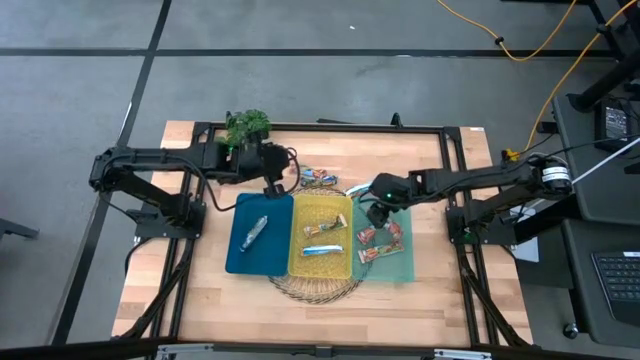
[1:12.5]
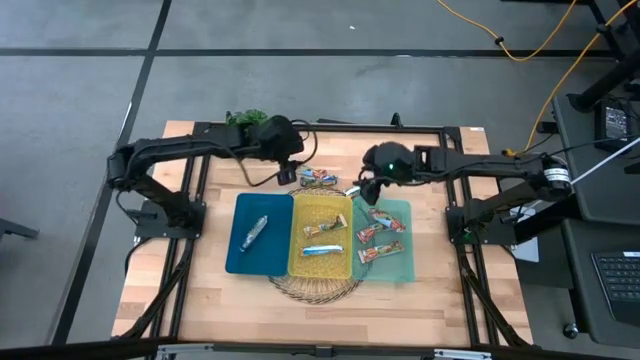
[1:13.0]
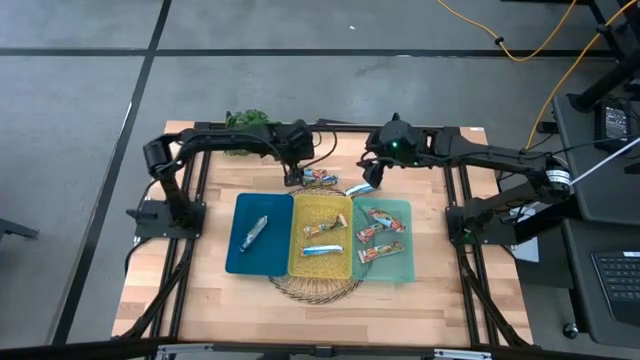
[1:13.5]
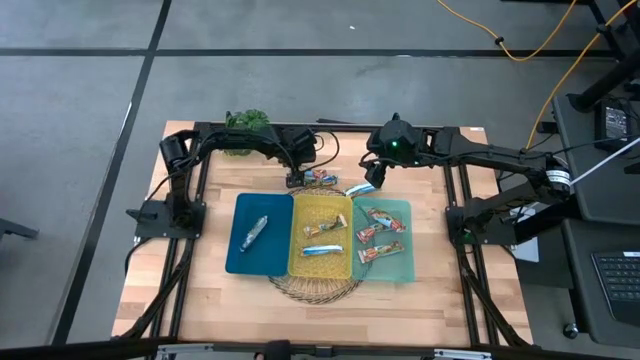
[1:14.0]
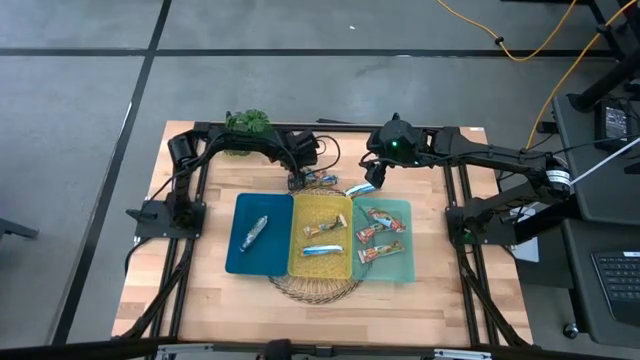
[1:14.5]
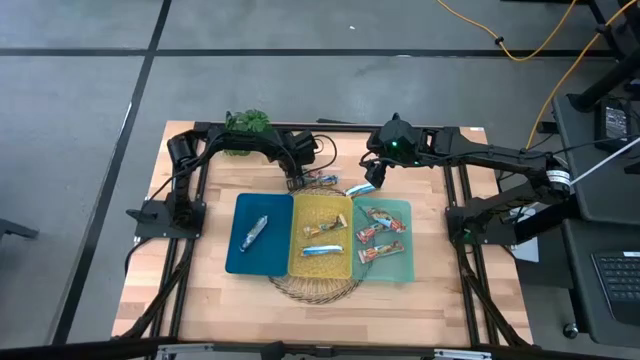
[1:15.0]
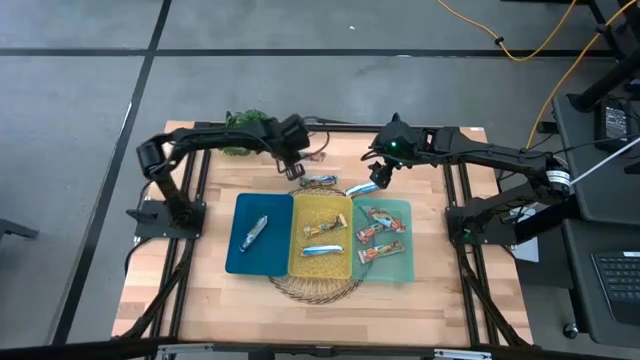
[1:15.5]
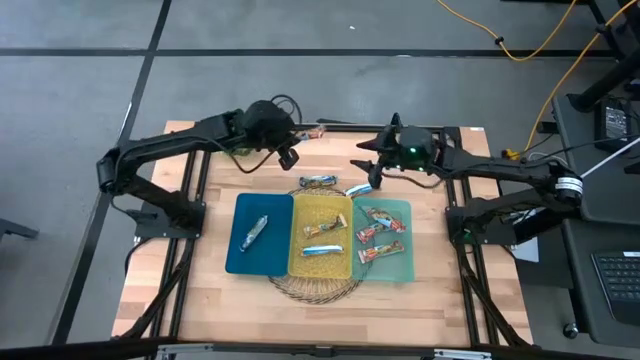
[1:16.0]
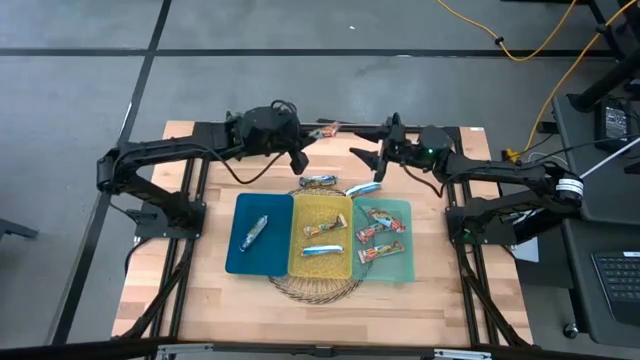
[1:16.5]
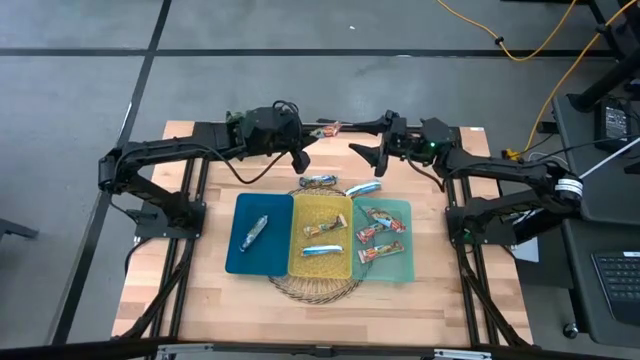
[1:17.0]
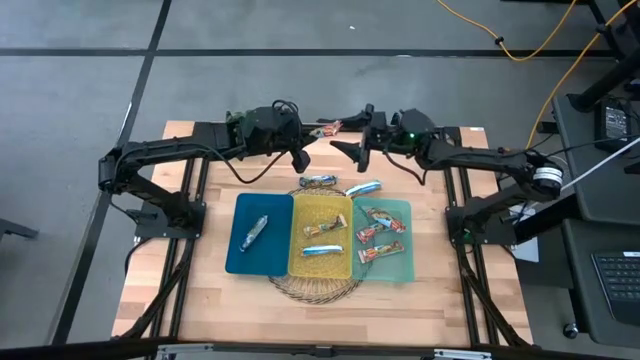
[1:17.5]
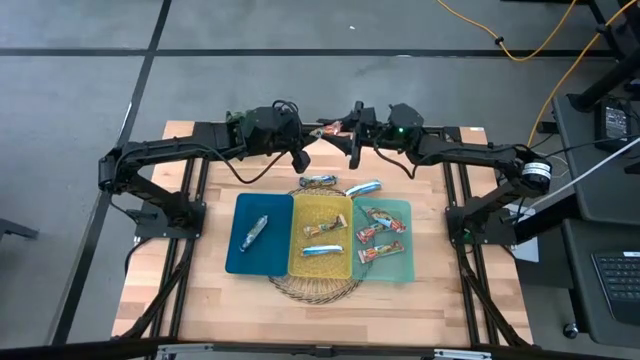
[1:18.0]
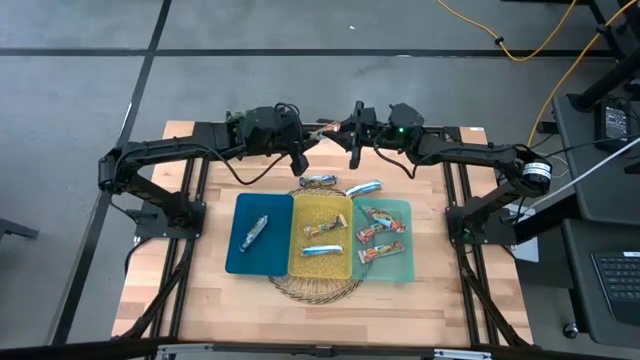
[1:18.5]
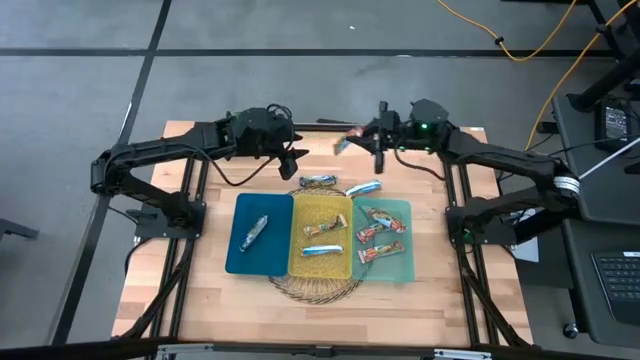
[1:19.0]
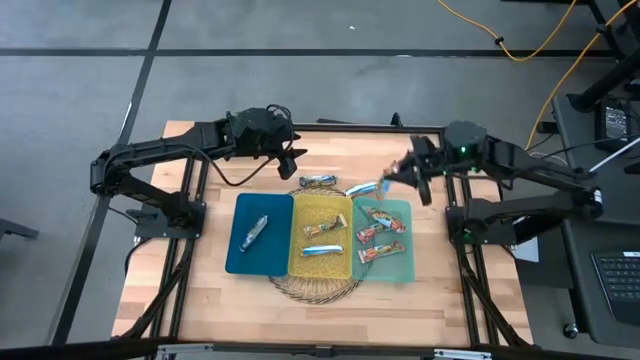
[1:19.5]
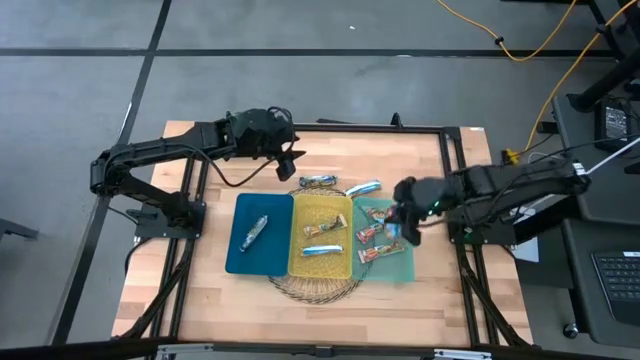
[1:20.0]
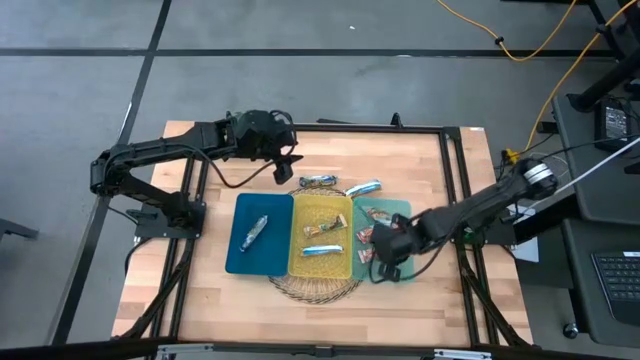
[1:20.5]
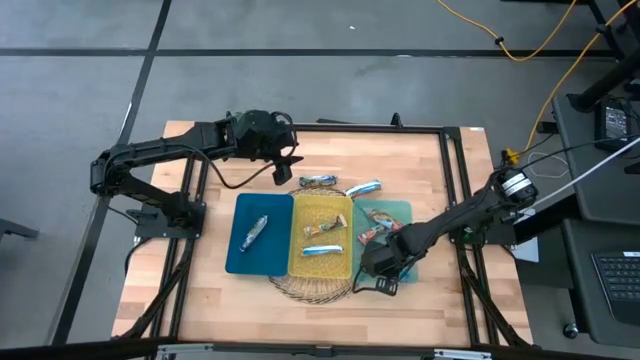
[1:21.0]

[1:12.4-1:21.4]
Task: Pick and place Granola Bars by type
Put the red granola bar into the green bin

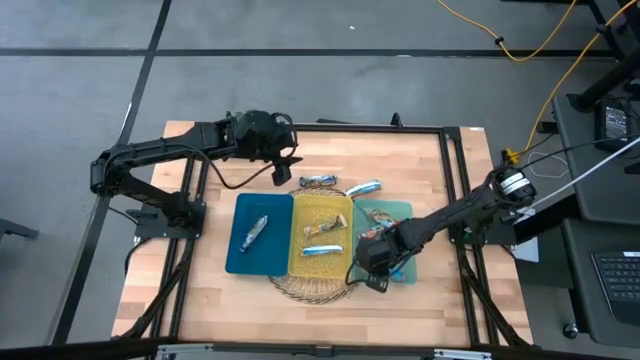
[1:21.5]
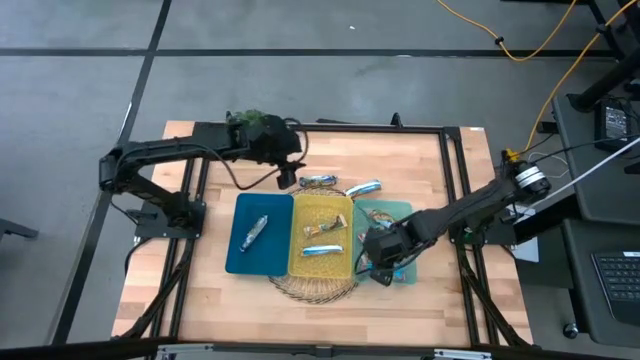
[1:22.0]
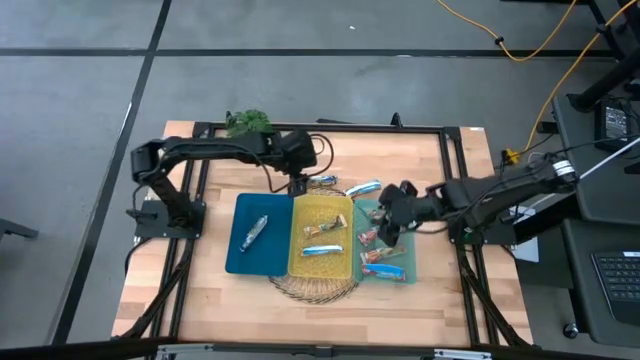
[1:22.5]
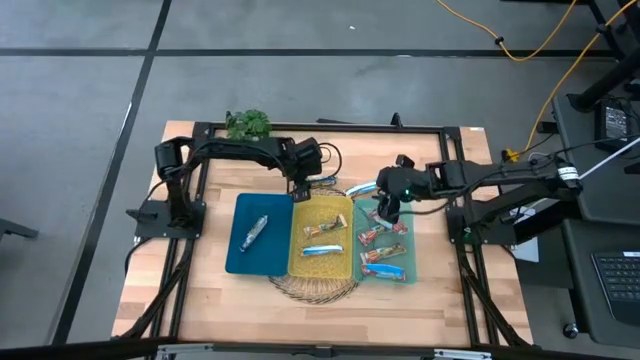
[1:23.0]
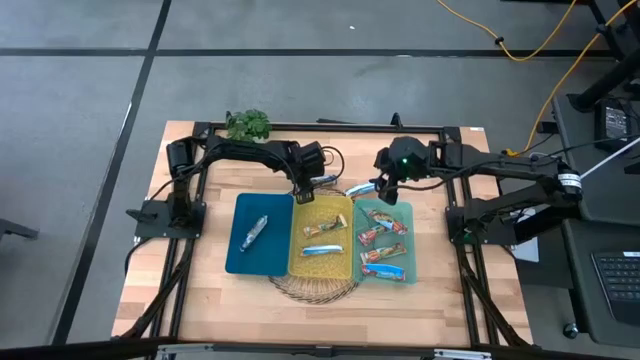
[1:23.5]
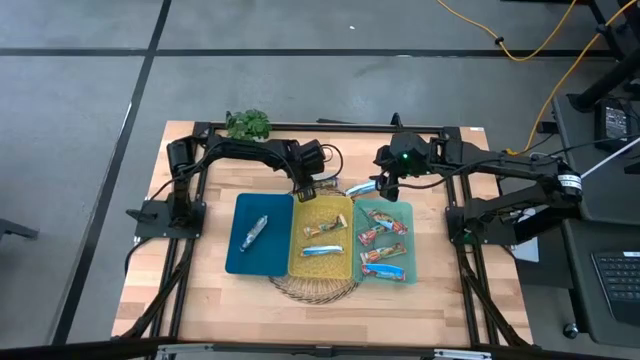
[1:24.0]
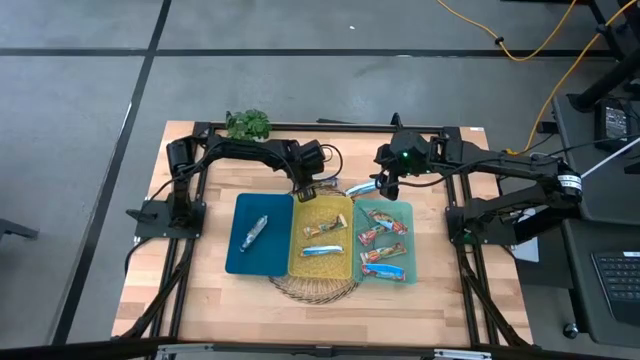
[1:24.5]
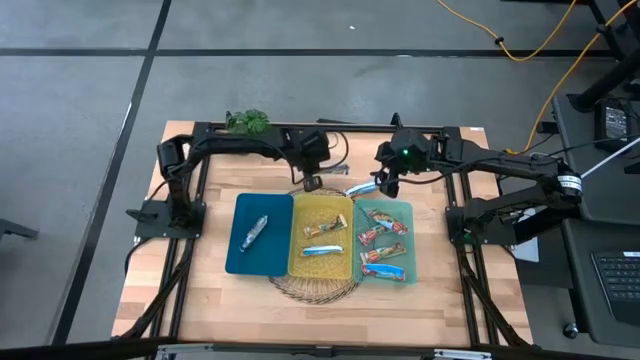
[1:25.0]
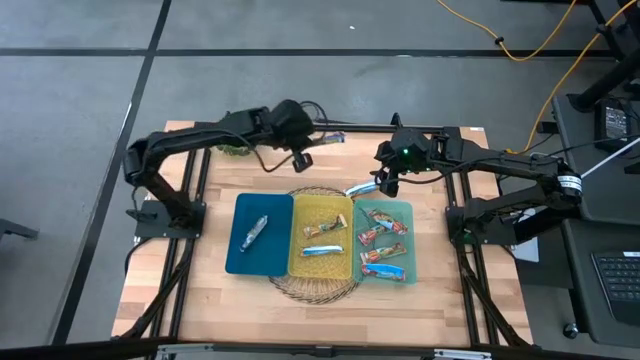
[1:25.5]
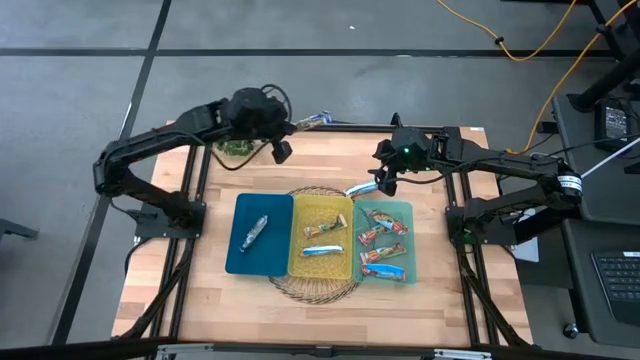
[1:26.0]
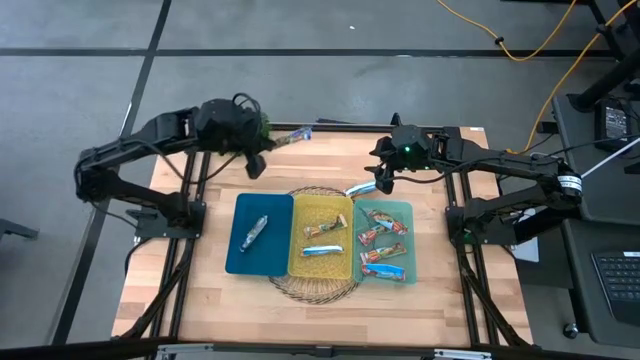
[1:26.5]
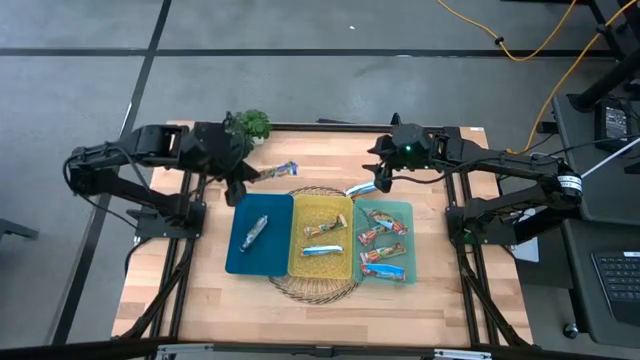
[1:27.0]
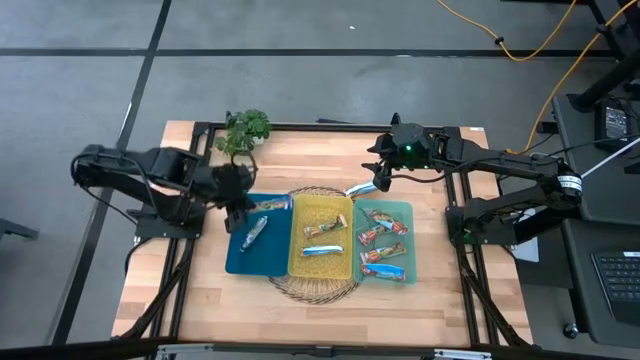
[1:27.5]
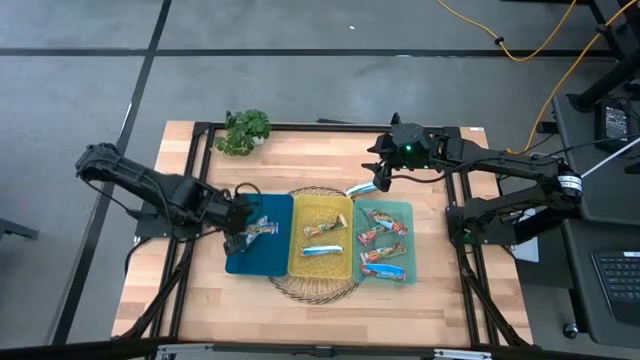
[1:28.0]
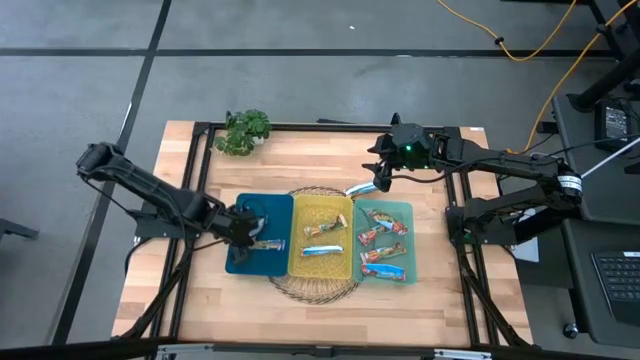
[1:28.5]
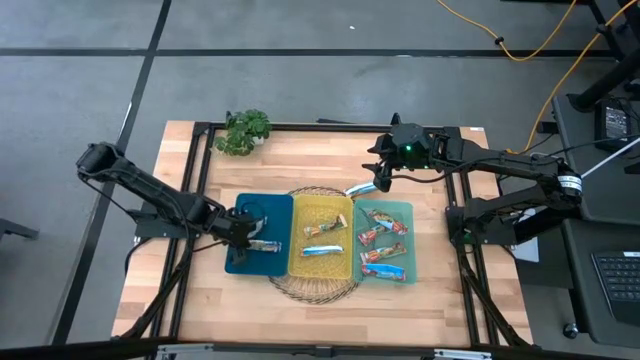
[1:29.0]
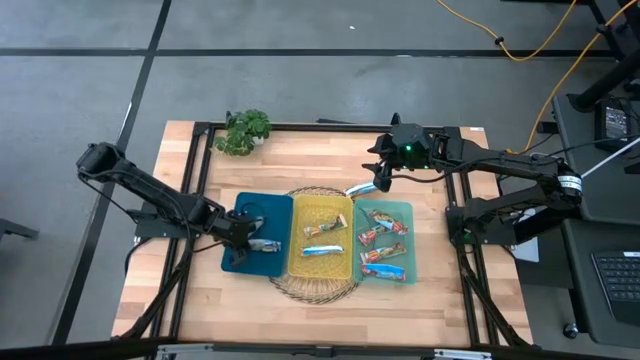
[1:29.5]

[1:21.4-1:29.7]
Put the blue granola bar into the blue bin

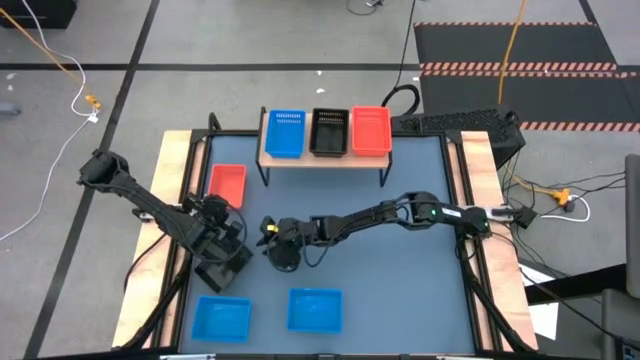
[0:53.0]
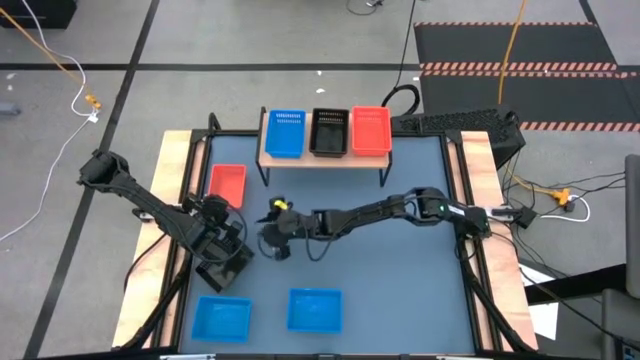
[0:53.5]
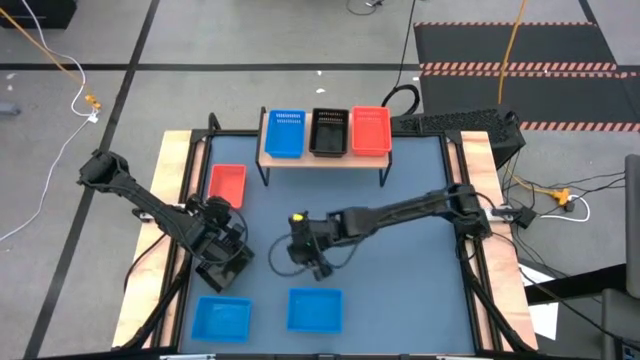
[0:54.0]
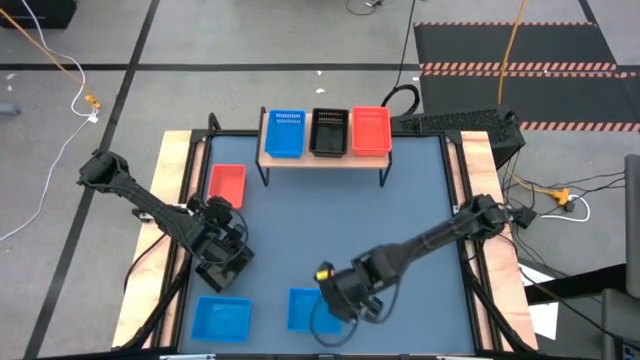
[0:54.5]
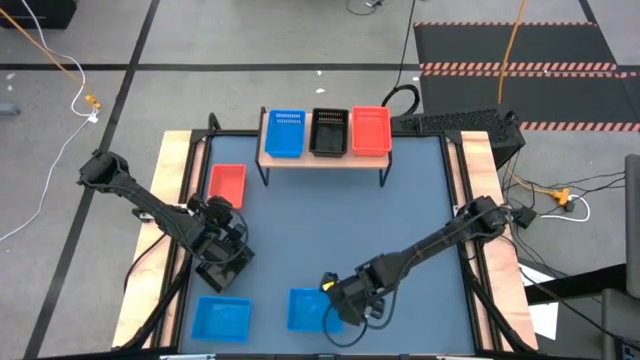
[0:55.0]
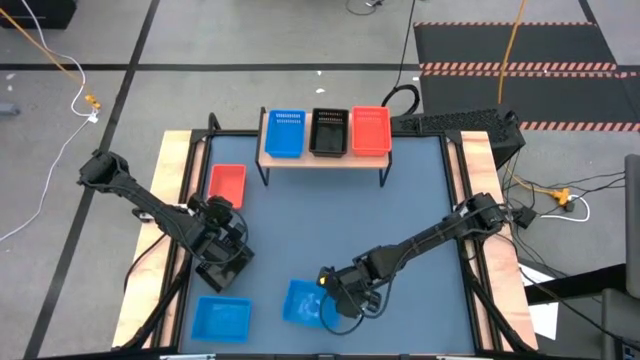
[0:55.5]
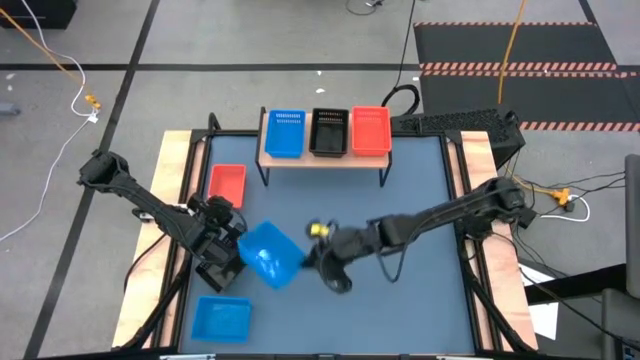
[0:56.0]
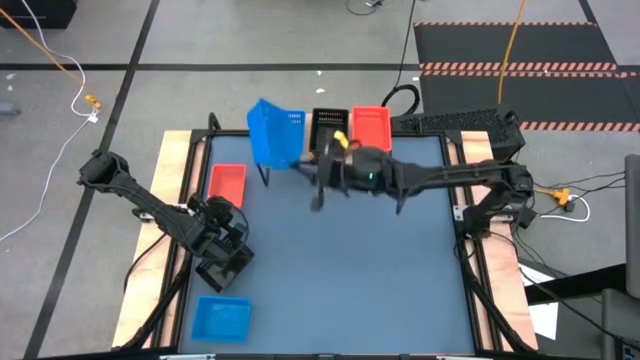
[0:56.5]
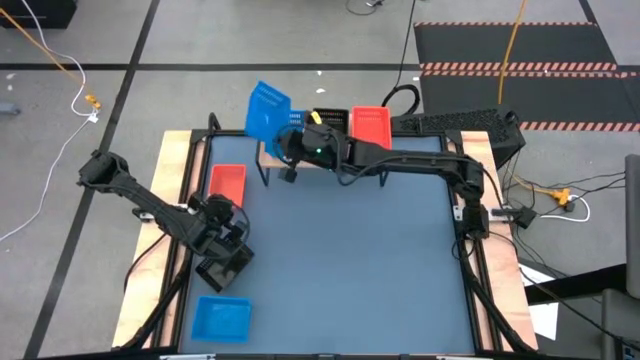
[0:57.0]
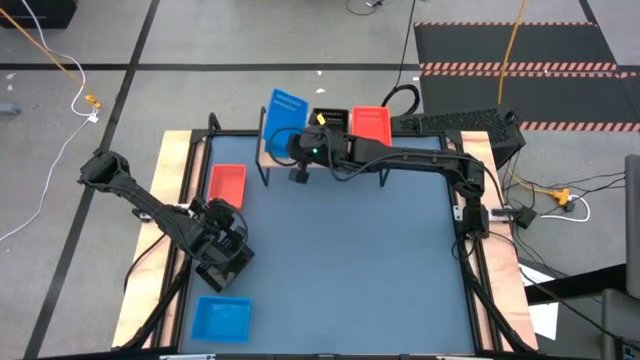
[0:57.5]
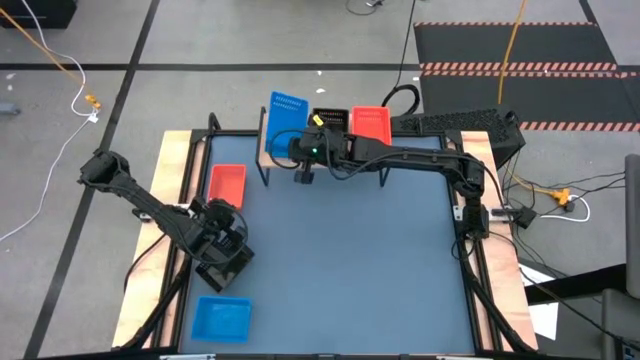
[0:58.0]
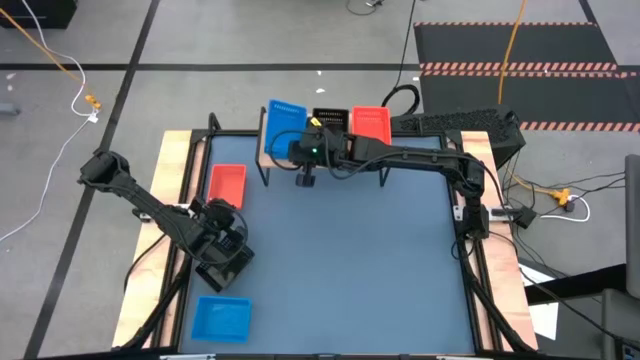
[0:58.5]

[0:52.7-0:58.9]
Task: Stack baskets on shelf by color
Stack the right blue bin on the blue bin on the shelf
